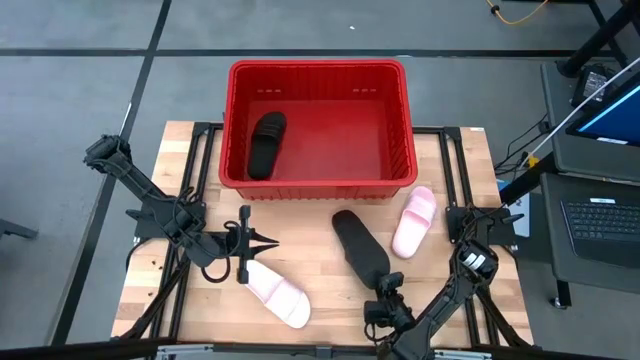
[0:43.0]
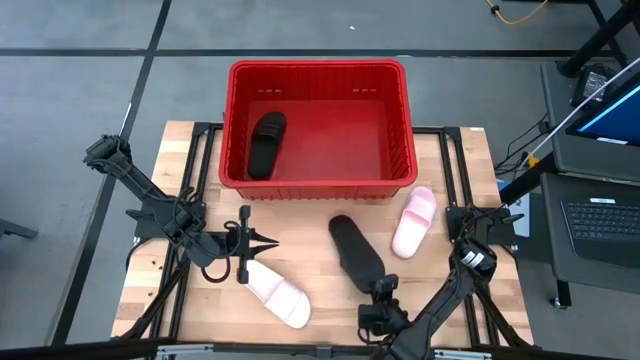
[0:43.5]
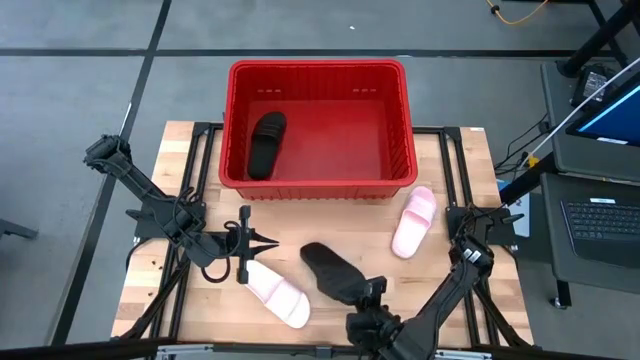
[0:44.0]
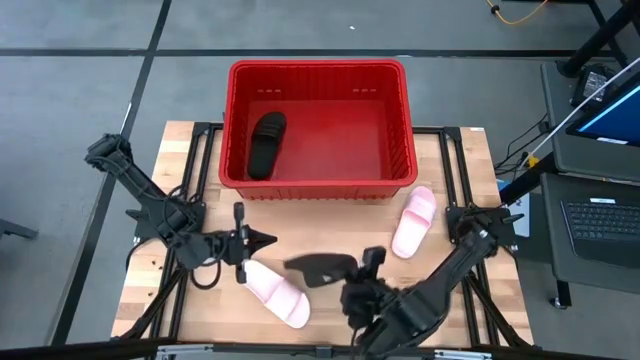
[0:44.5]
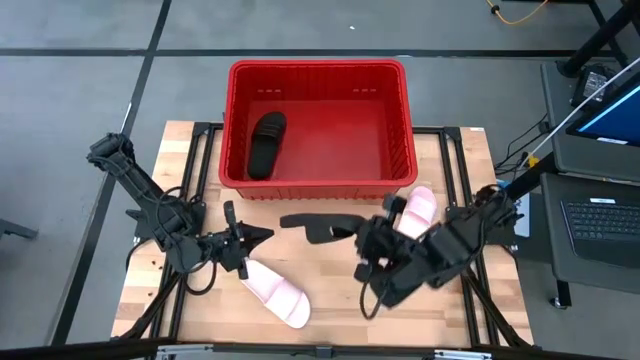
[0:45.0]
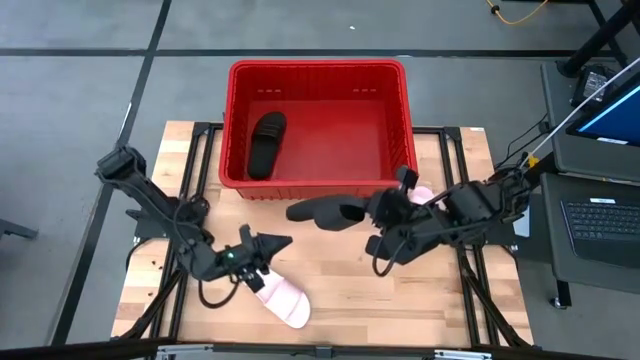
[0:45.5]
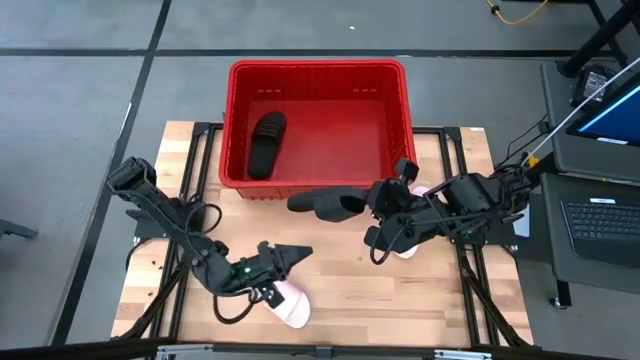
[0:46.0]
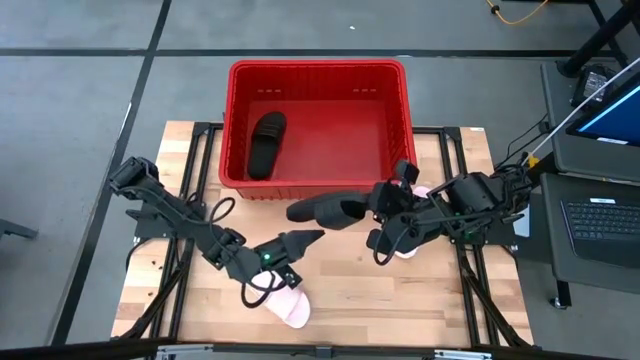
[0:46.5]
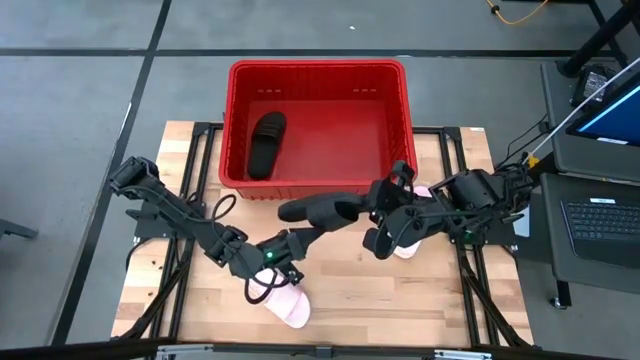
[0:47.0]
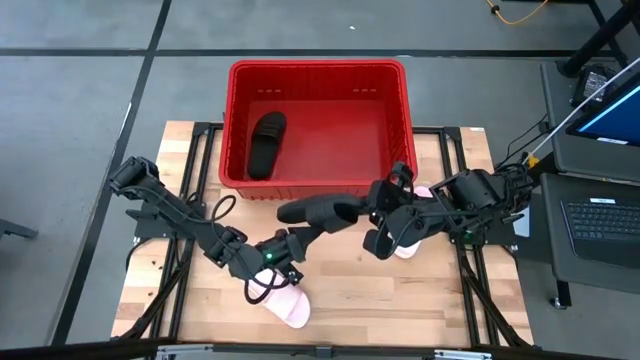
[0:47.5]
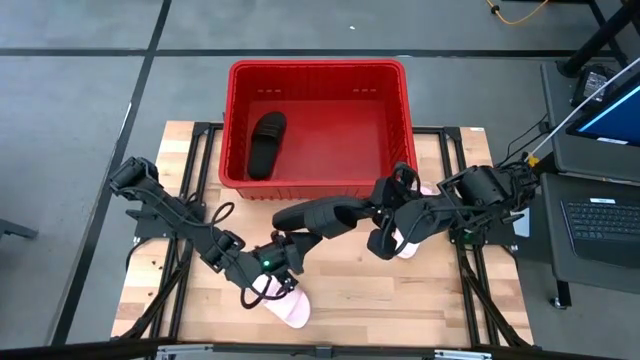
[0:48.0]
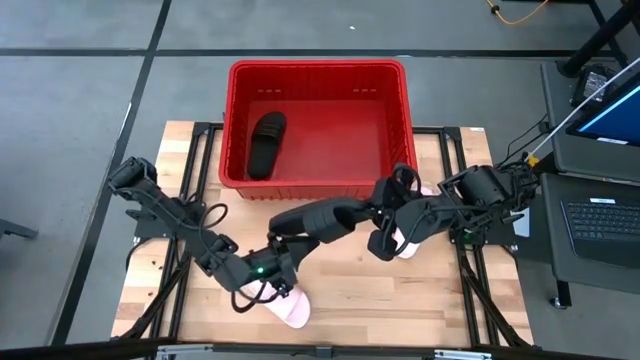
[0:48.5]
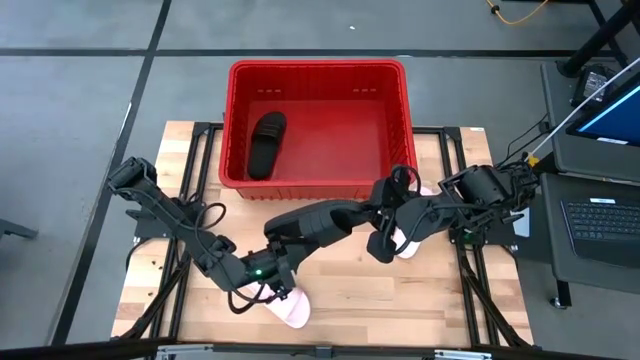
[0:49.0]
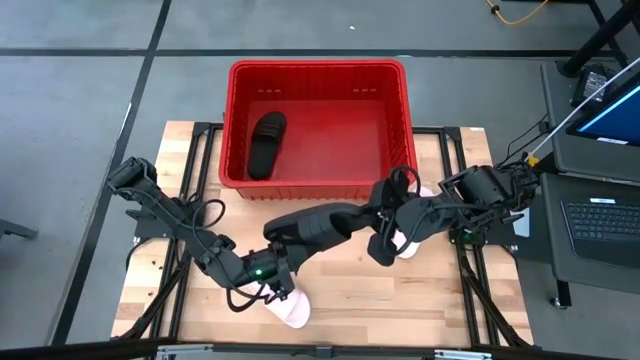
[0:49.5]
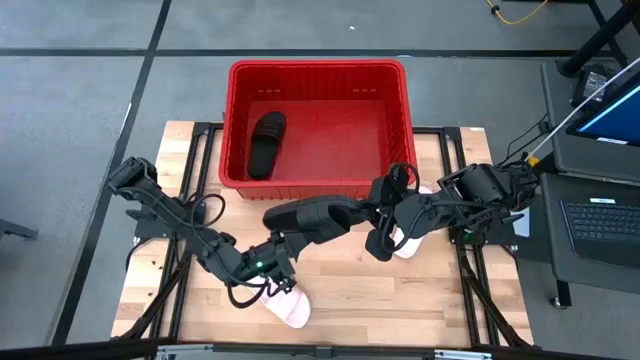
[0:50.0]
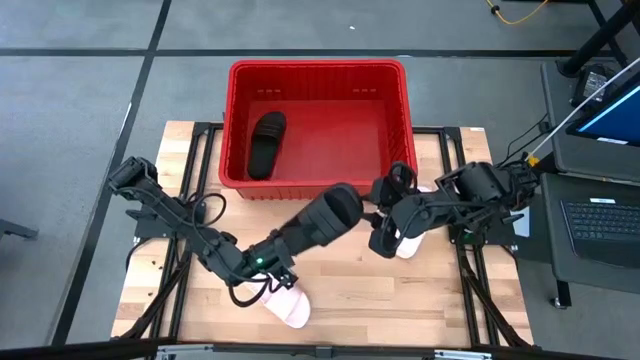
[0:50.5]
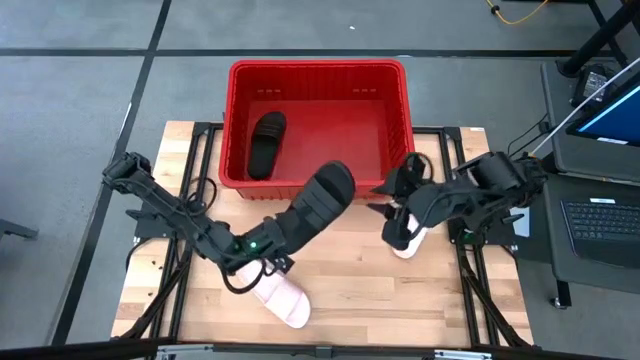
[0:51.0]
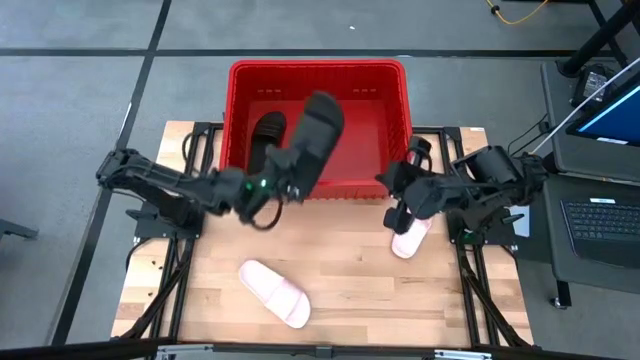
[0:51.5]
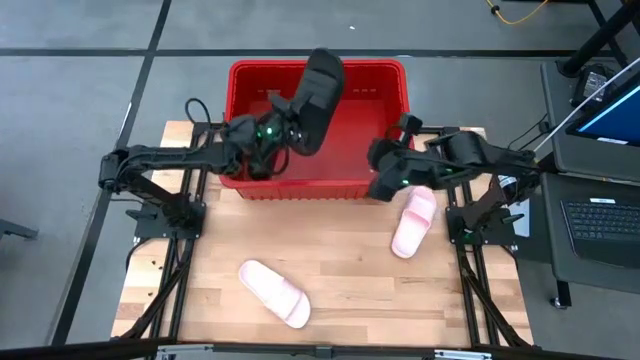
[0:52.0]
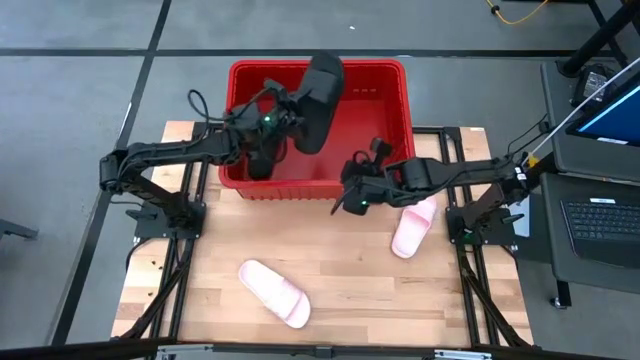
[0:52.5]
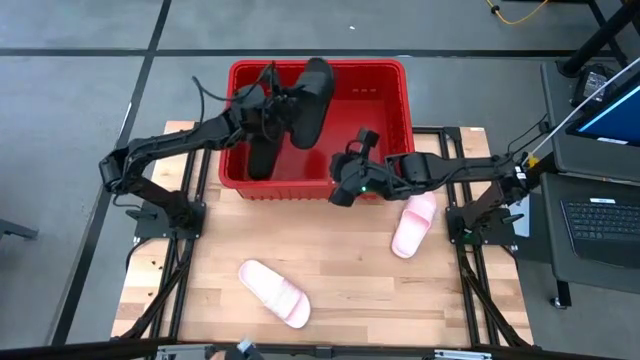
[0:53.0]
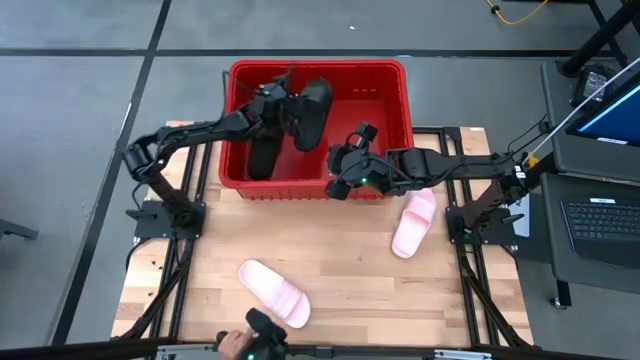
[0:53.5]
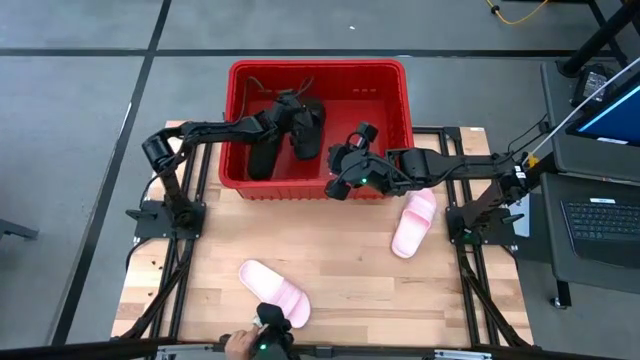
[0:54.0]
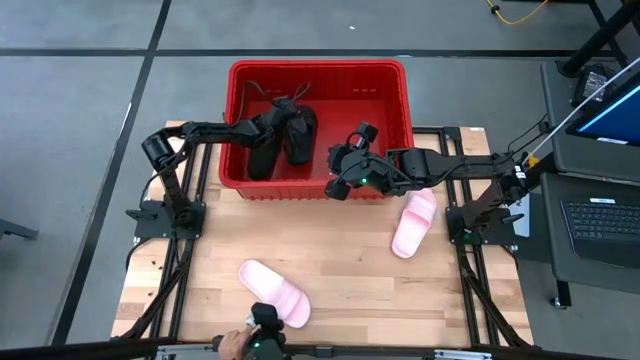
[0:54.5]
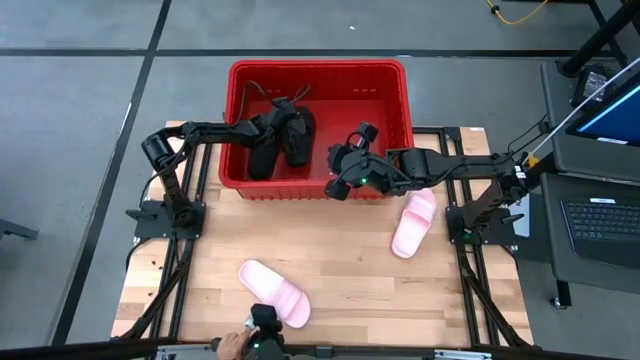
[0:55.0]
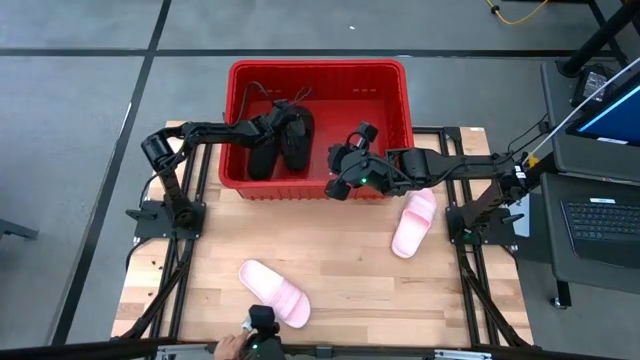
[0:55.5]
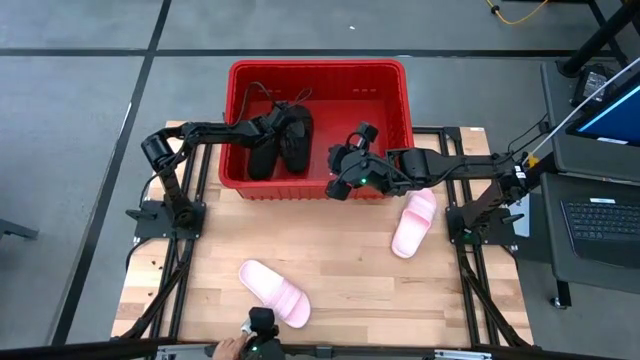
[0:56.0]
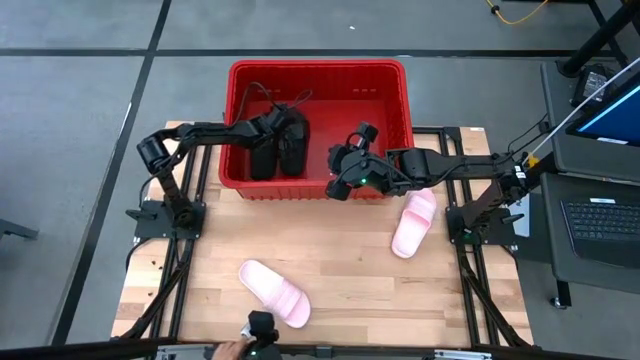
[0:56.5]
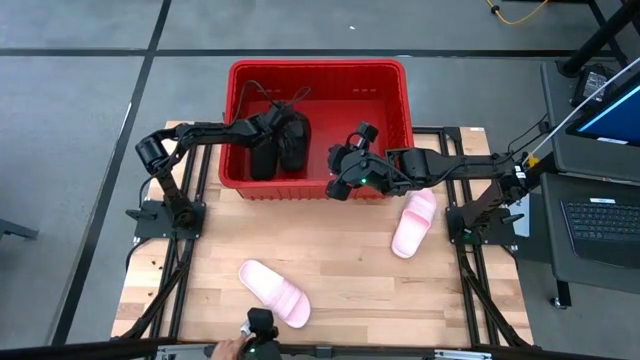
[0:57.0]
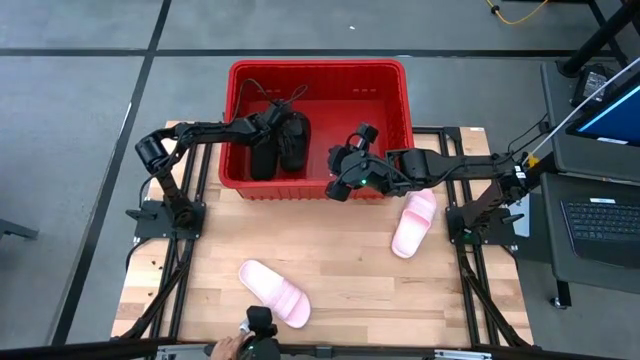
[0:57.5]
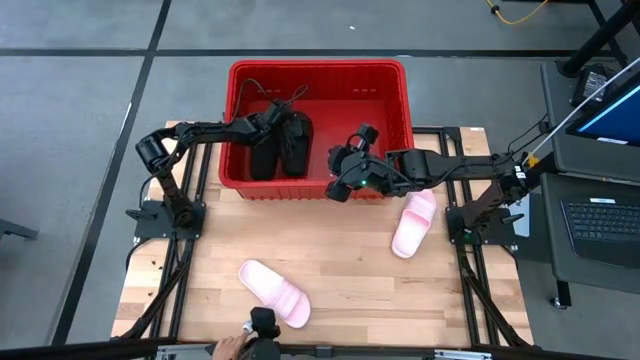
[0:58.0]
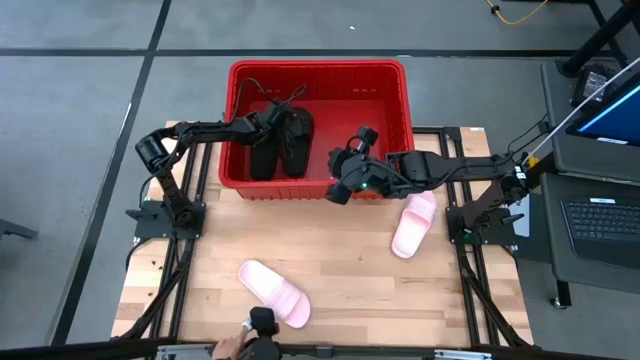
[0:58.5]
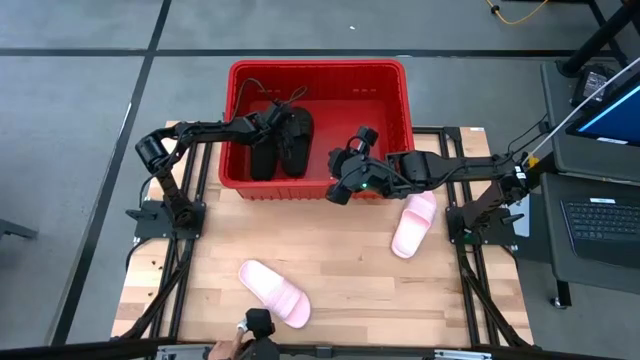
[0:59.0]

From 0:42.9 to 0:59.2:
Task: Pick and place slides into bin
Put the black slide into the red container

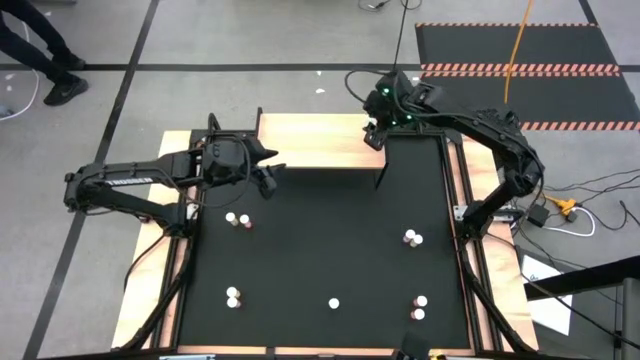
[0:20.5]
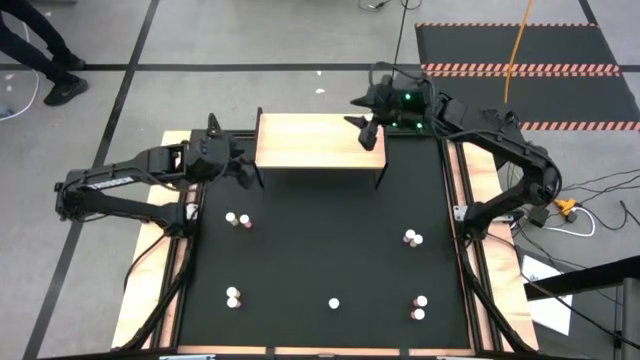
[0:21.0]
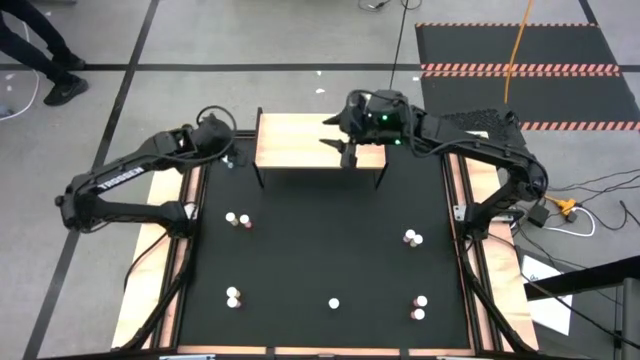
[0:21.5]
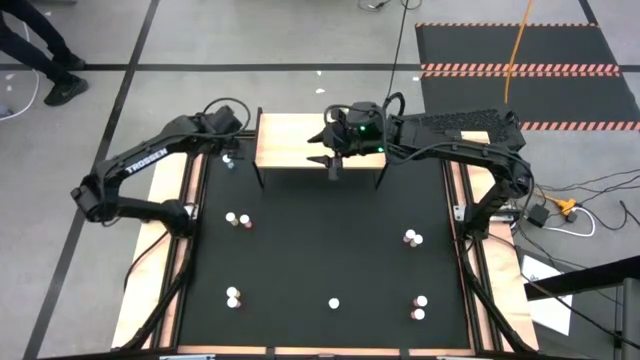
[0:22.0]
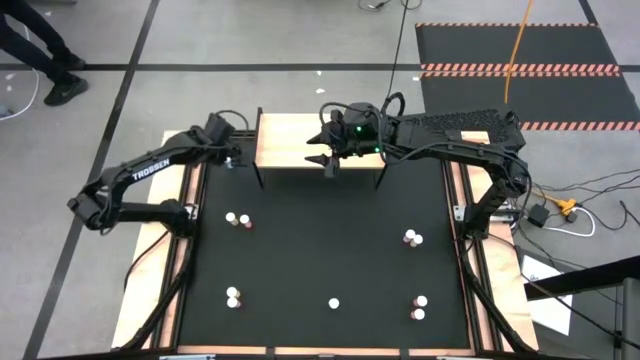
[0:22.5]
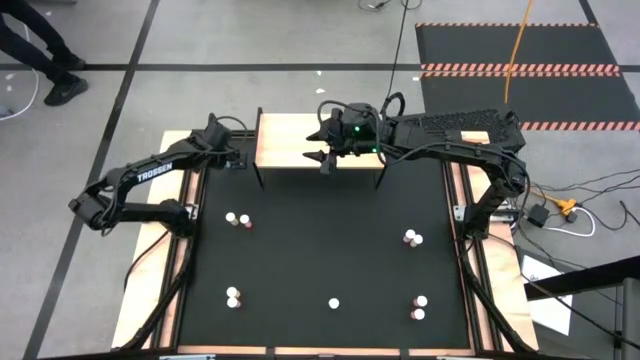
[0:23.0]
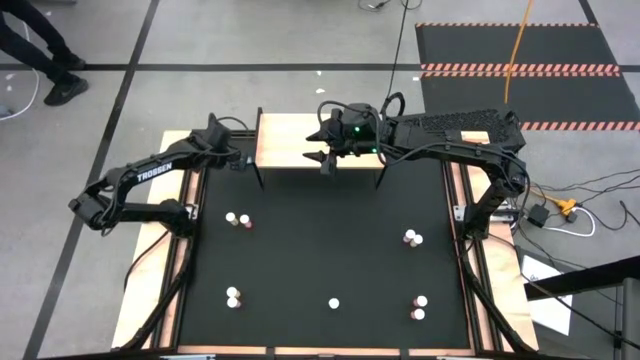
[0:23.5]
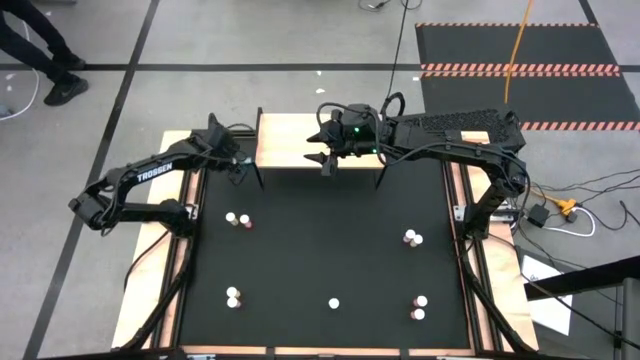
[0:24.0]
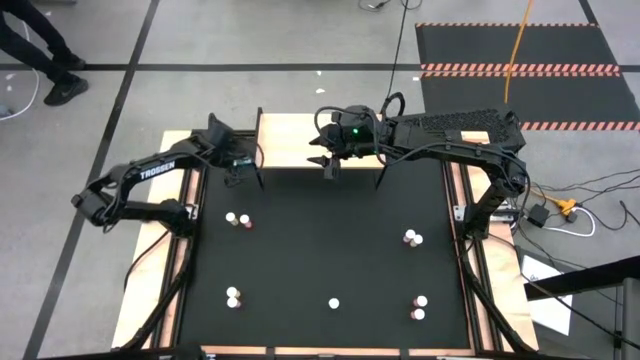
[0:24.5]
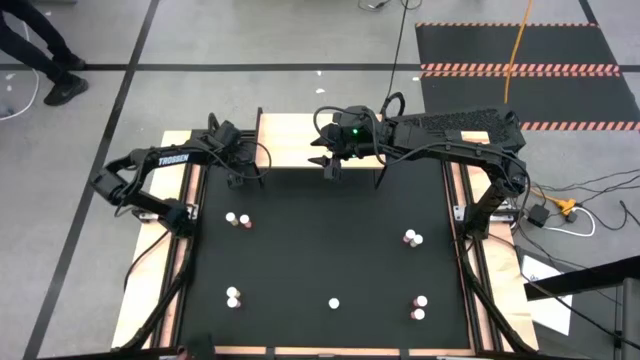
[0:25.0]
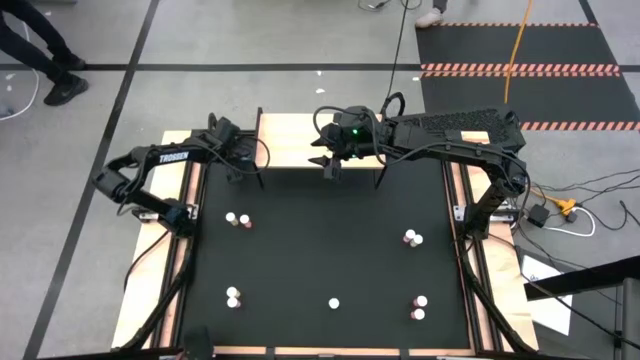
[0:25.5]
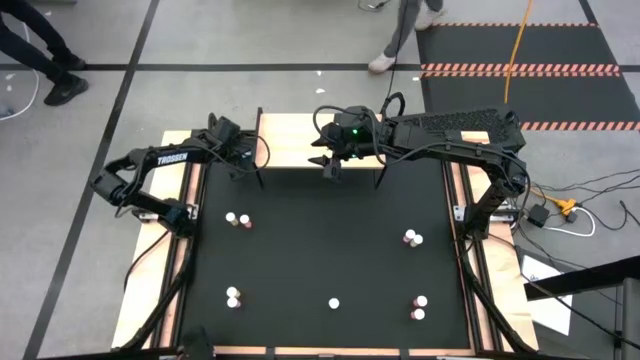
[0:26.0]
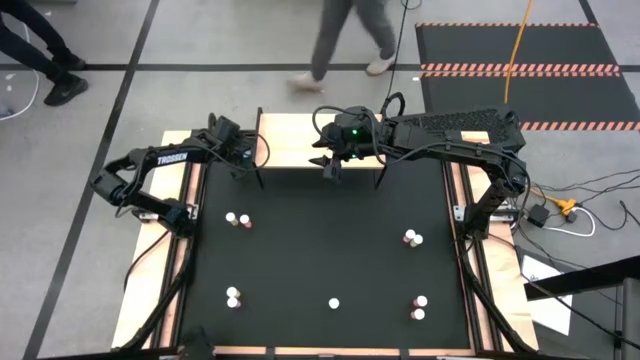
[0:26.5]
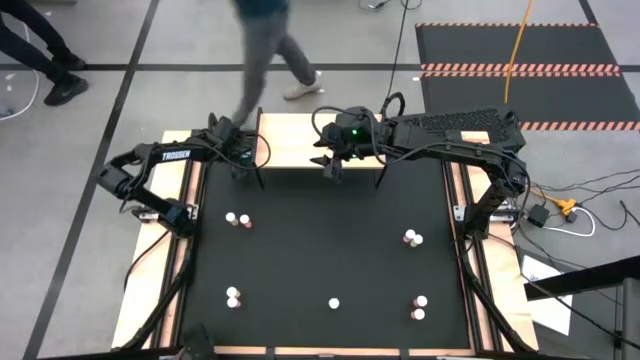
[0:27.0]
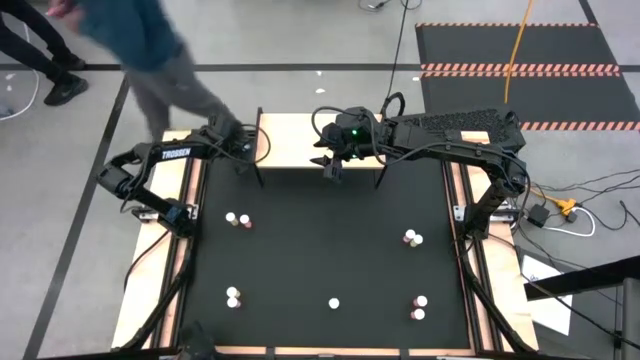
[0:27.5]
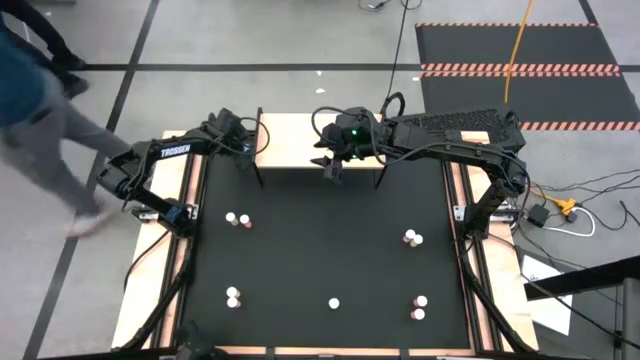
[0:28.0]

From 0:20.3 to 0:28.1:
Task: Pick and place medicine bottles onto shelf by color
Put the blue pill bottle on the shelf aligned with the other blue pill bottles
